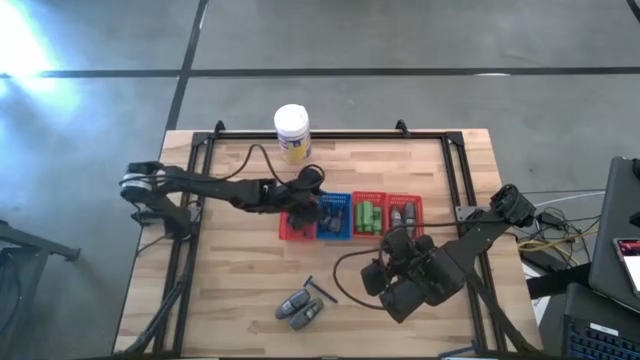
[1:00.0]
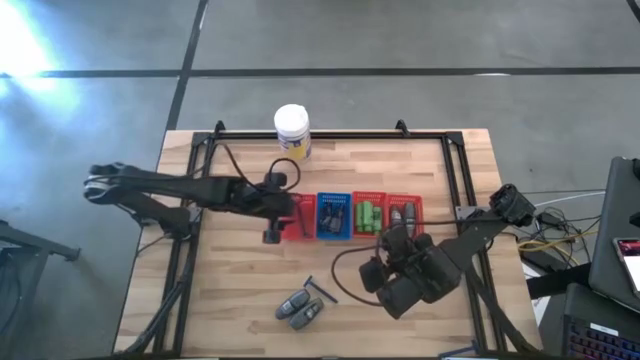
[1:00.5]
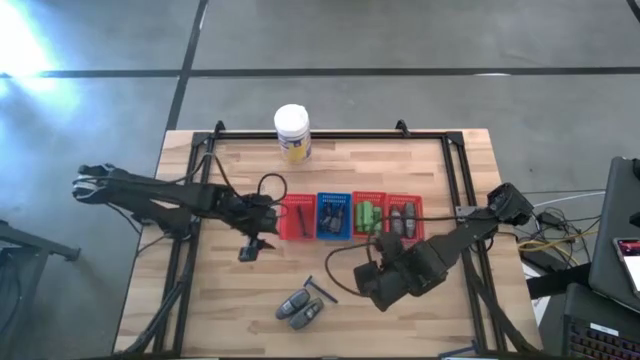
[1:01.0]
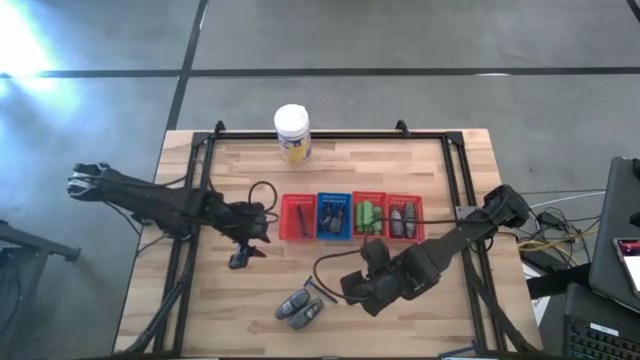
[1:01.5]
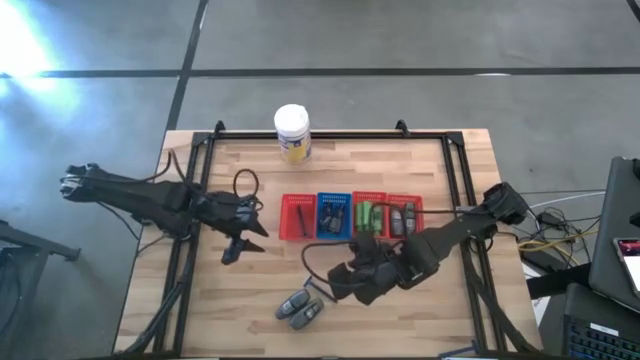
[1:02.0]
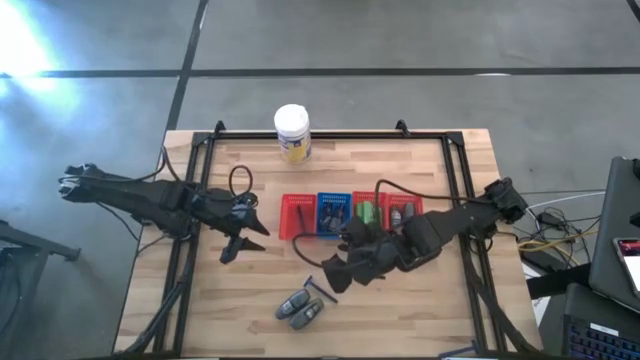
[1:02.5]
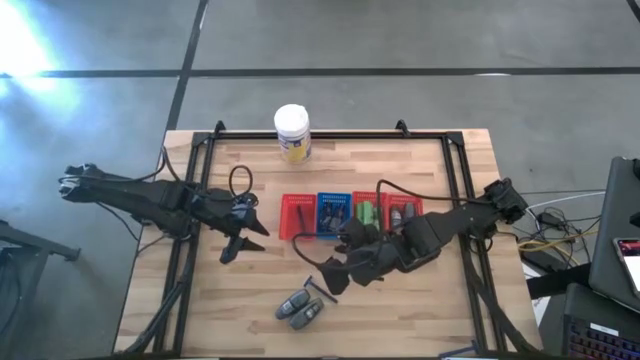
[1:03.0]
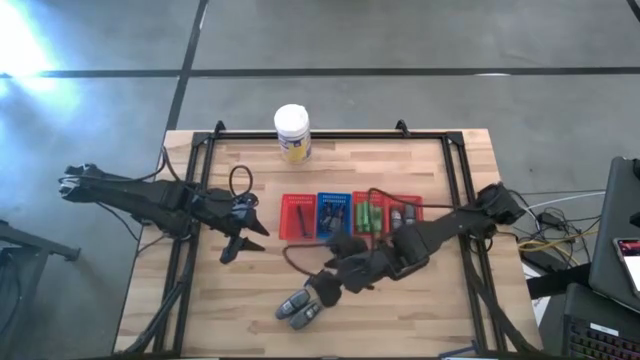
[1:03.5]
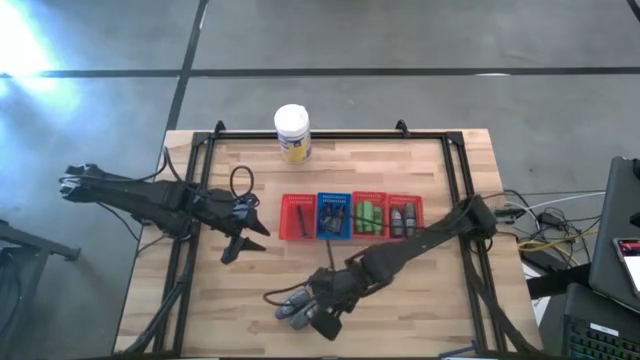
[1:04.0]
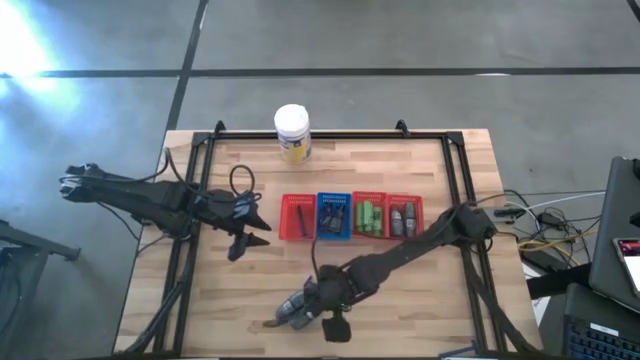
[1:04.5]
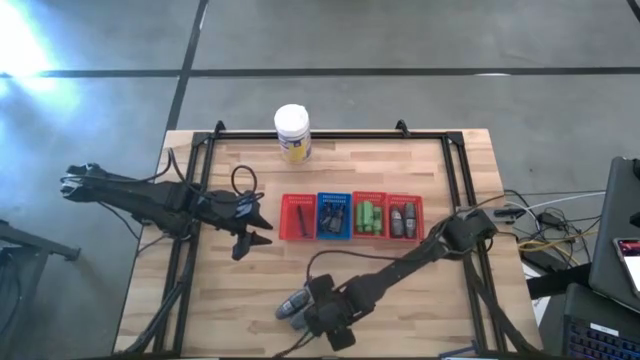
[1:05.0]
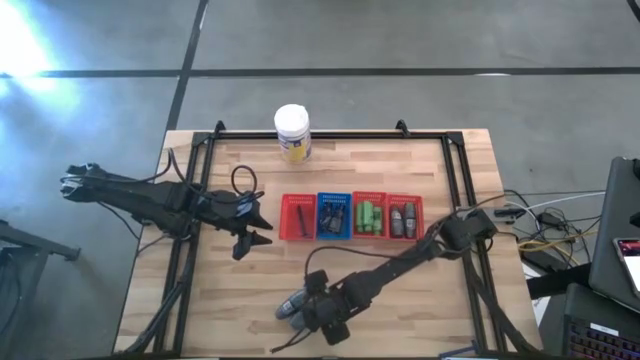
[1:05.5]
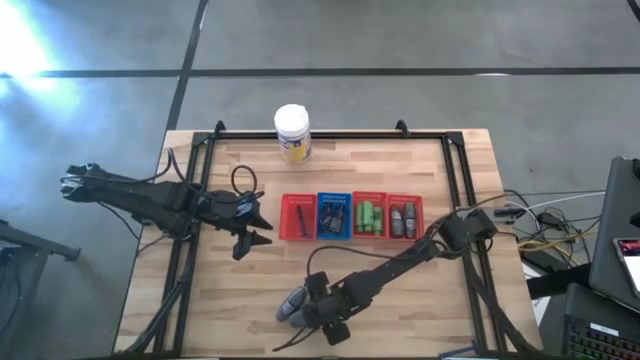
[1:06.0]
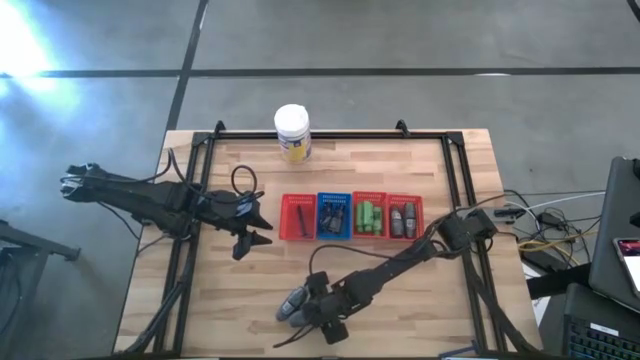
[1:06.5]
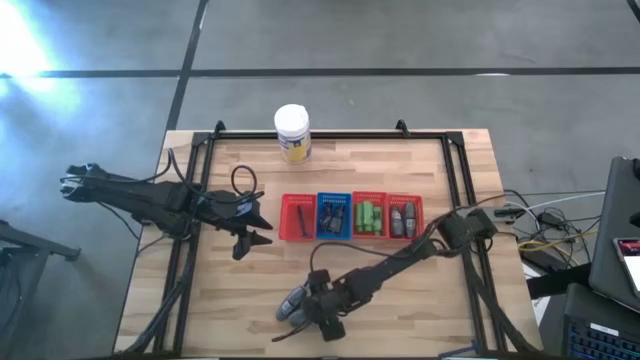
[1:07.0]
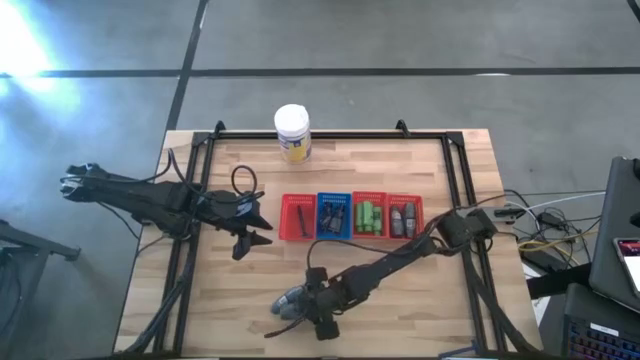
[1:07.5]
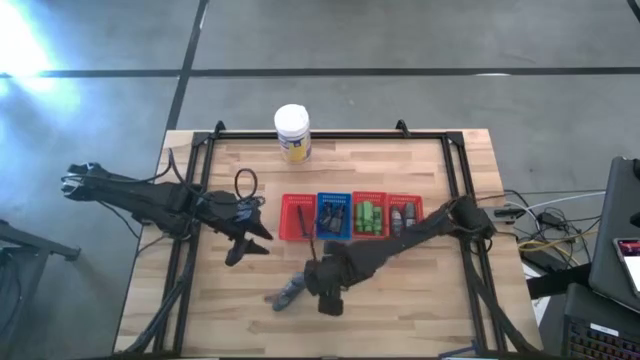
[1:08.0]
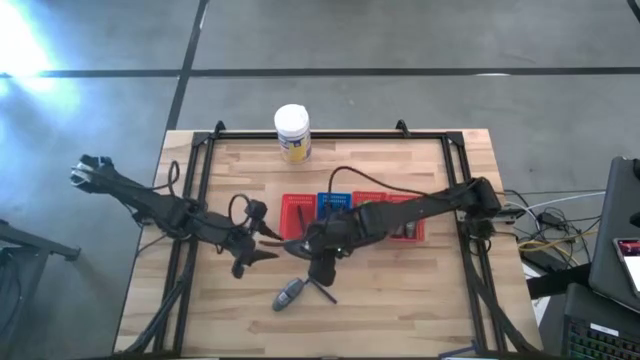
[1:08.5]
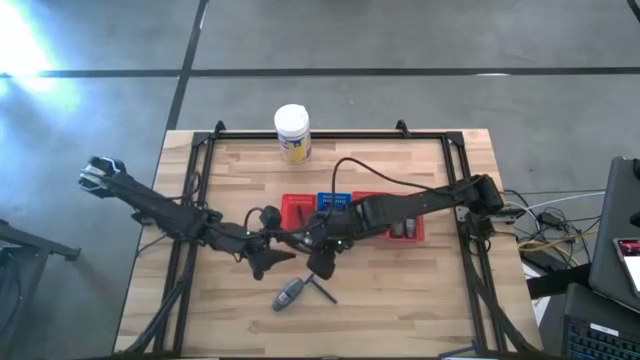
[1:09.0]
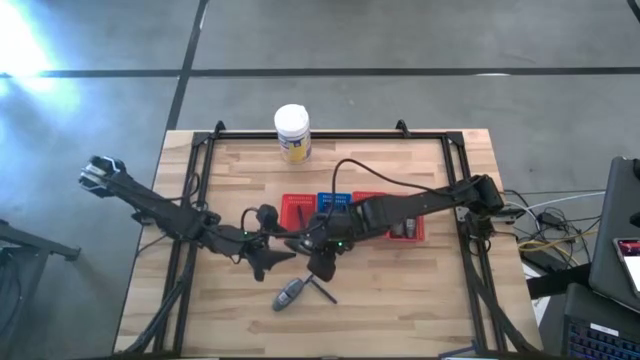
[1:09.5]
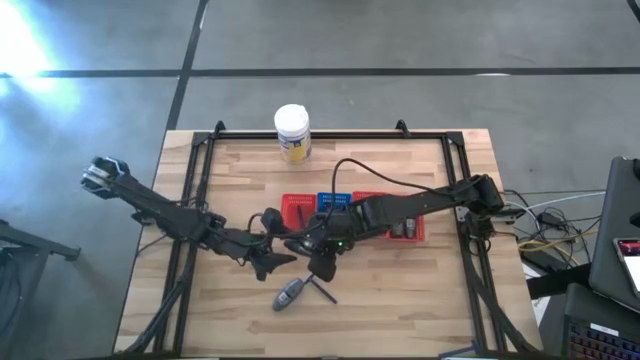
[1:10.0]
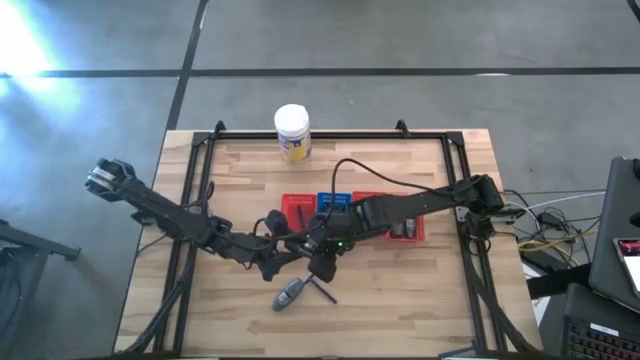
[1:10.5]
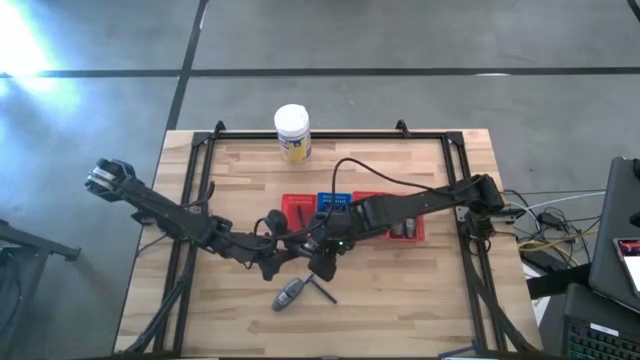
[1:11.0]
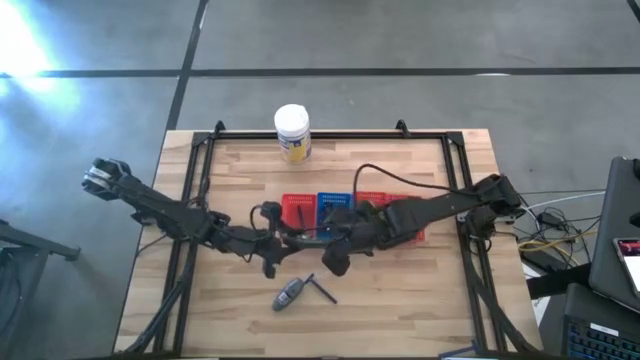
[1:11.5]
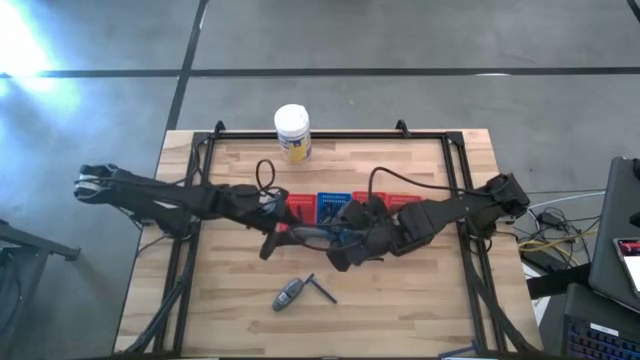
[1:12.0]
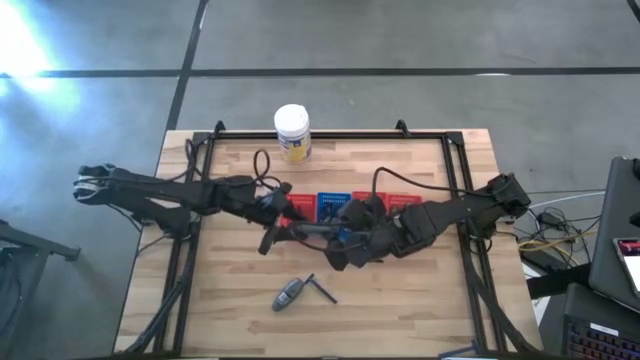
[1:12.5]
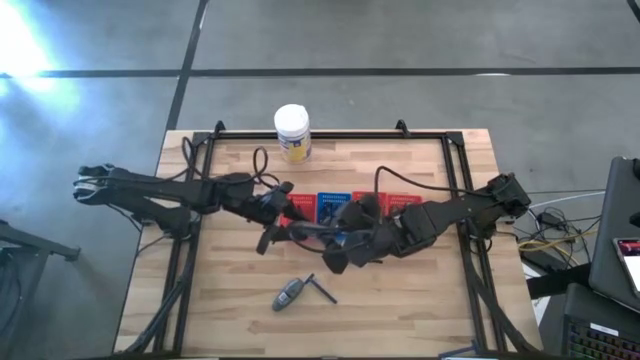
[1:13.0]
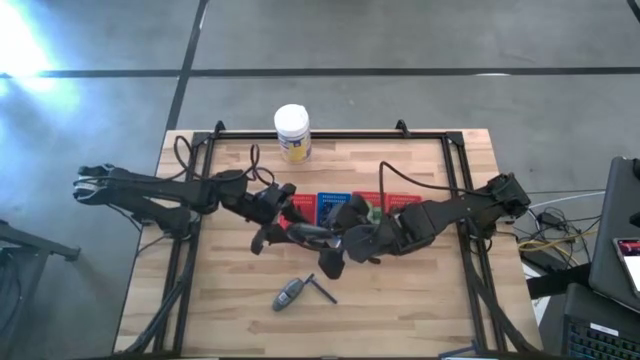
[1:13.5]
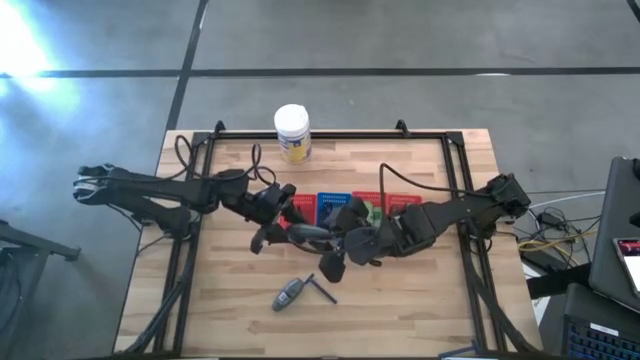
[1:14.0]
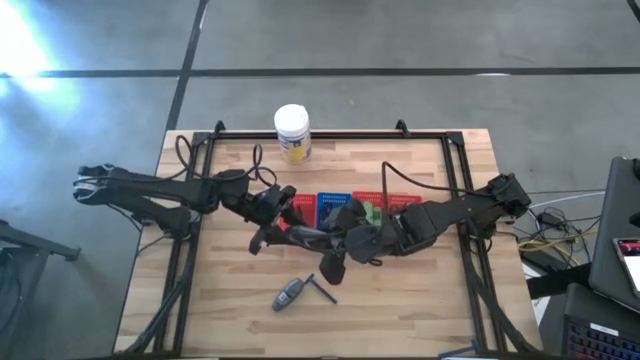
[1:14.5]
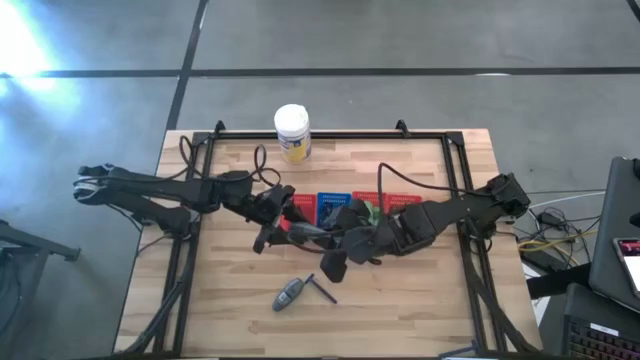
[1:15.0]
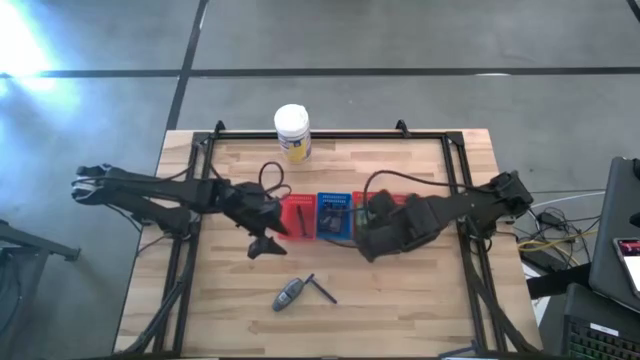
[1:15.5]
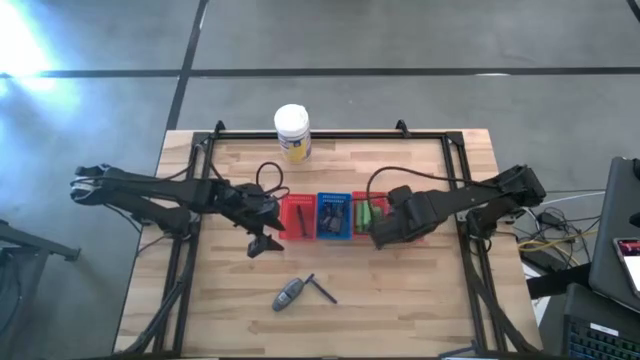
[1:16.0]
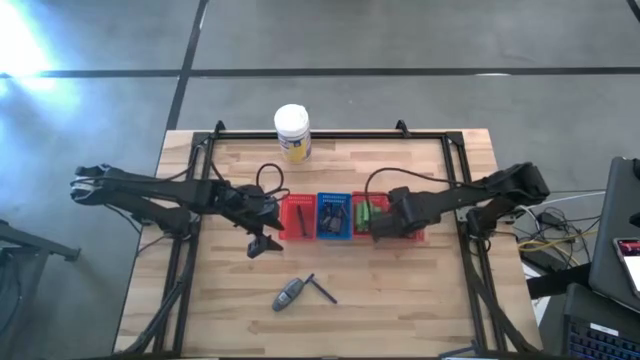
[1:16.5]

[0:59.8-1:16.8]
Task: Pick & Place Travel size toiletries
Put the gray deodorant into the right red bin

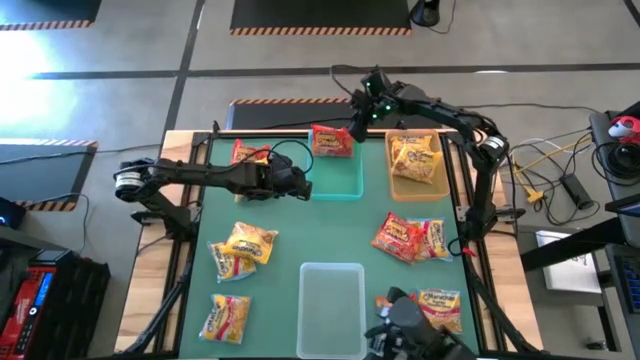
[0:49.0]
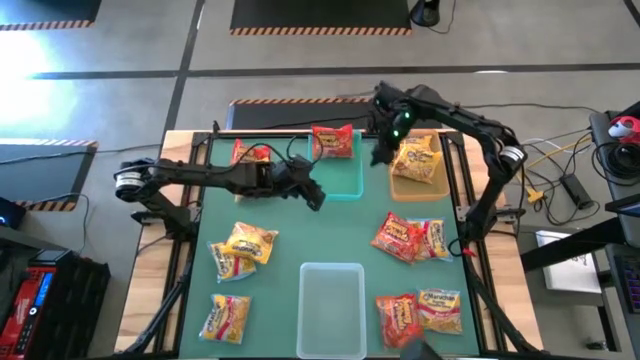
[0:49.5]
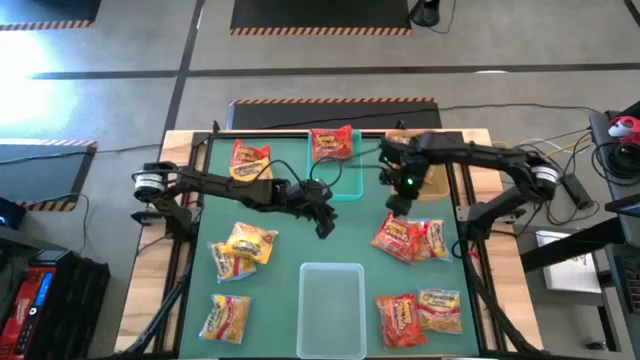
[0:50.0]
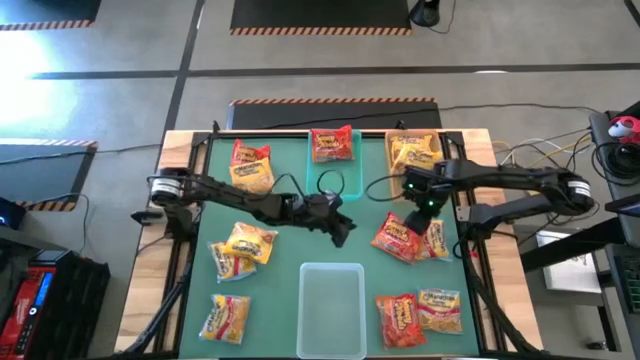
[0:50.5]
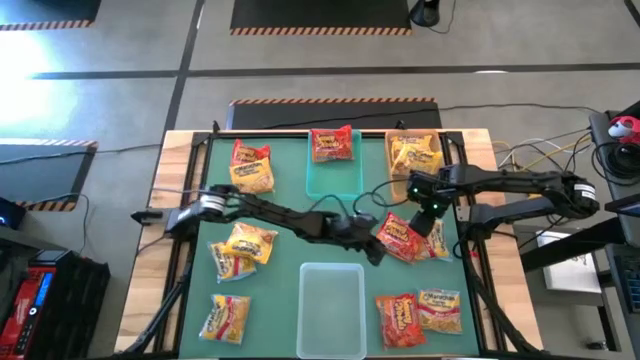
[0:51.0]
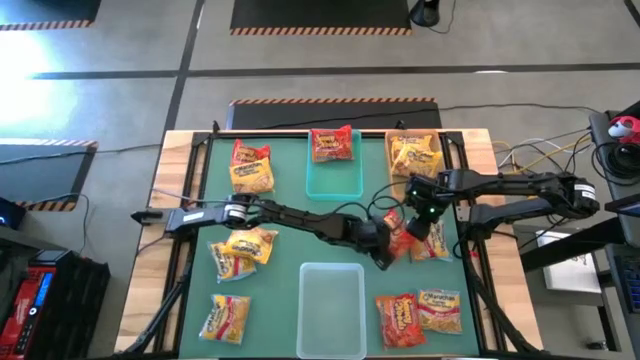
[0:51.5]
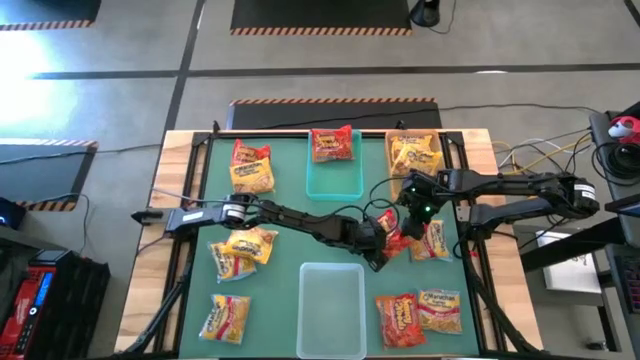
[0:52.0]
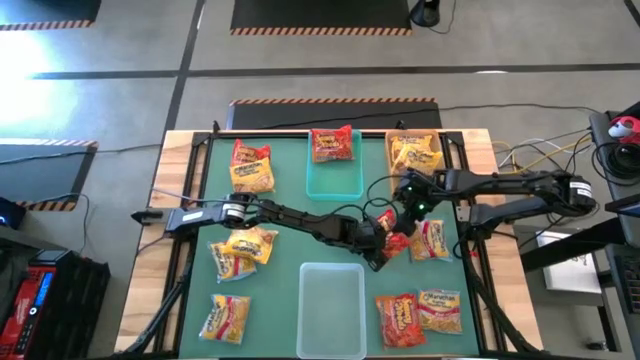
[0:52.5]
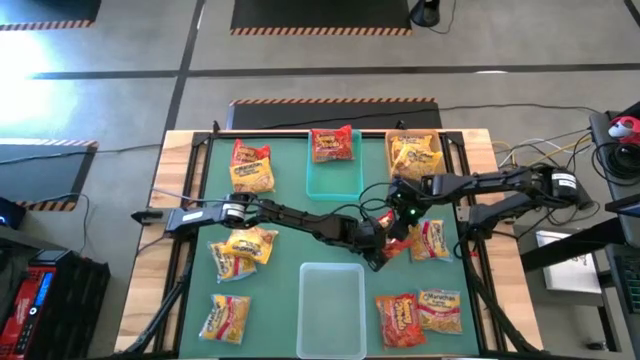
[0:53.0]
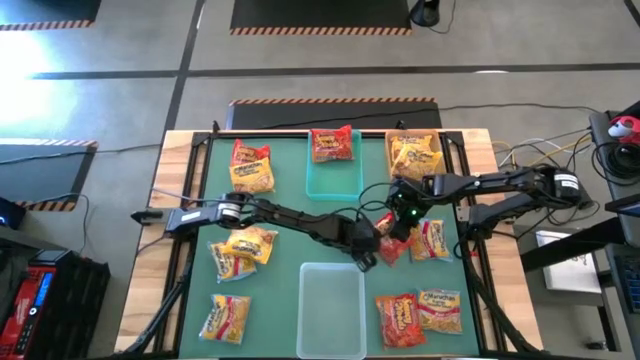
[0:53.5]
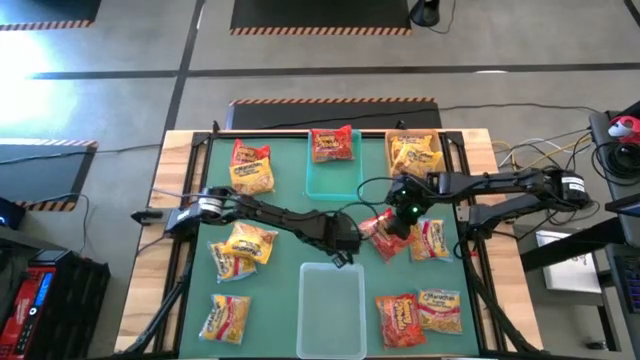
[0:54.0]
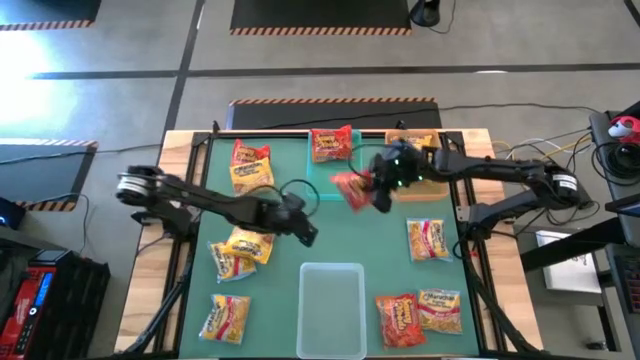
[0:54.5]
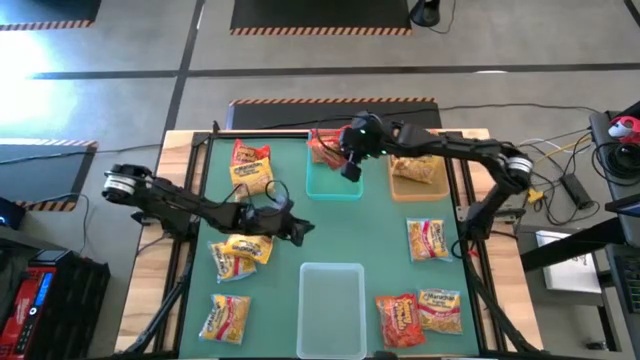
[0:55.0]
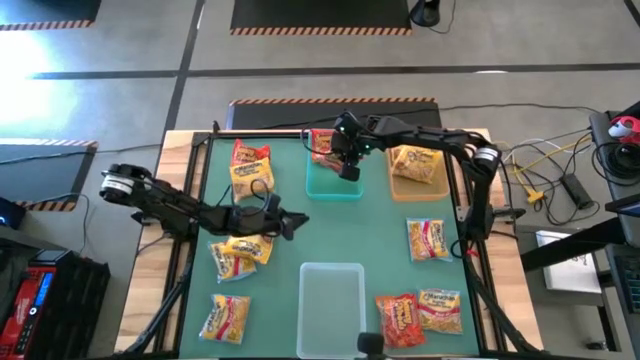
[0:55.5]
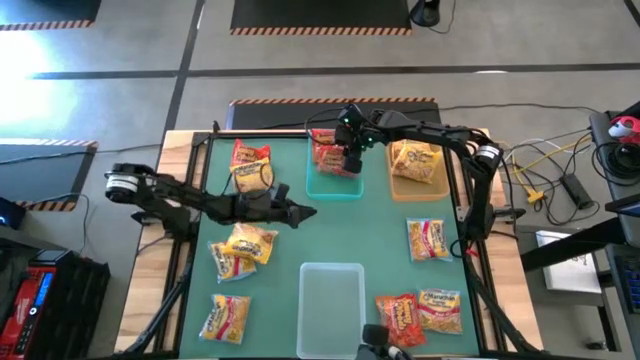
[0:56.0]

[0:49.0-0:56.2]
Task: Sort Maruchan noodles
Put the red noodle pack into the green bin
